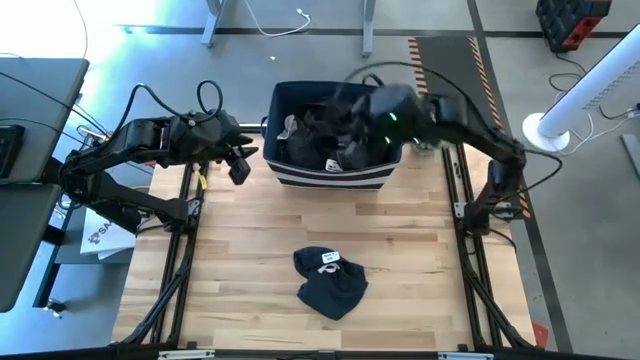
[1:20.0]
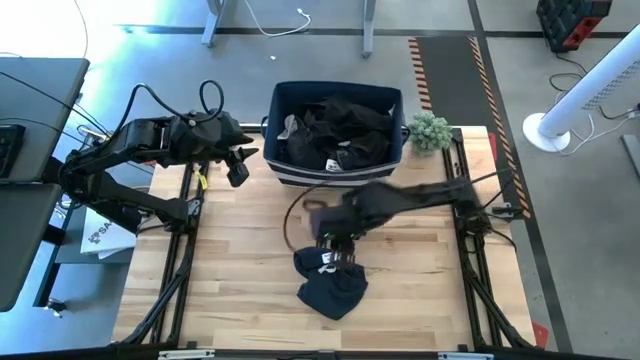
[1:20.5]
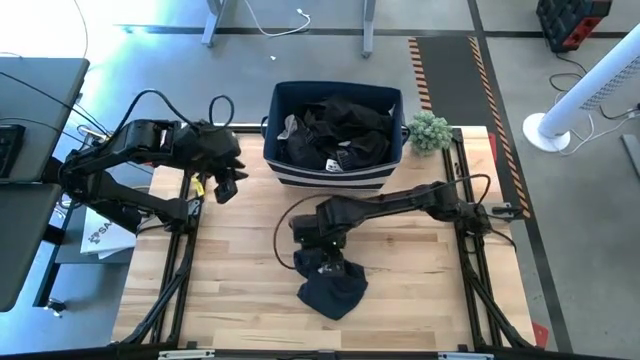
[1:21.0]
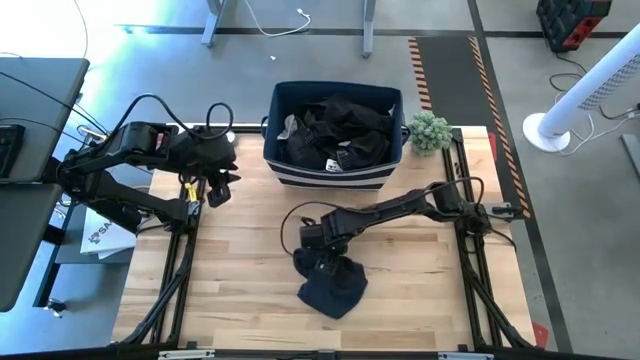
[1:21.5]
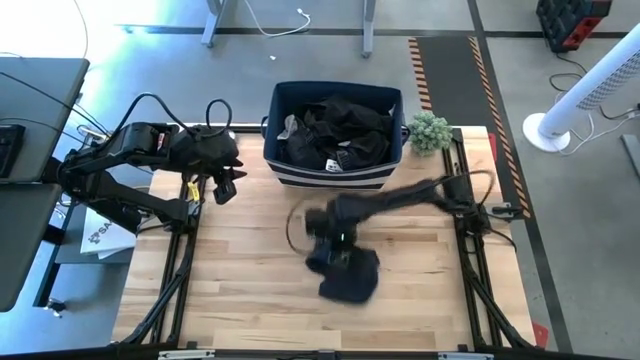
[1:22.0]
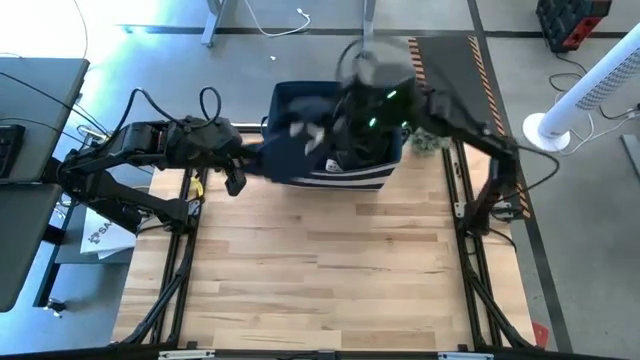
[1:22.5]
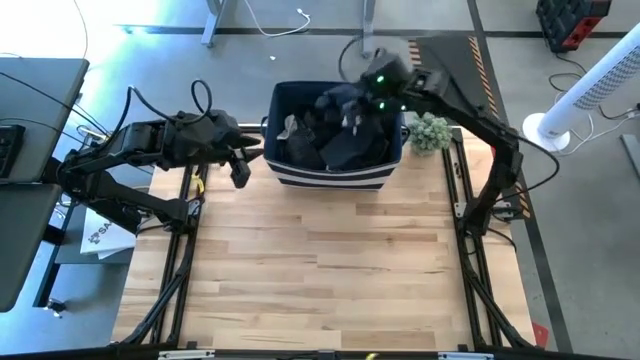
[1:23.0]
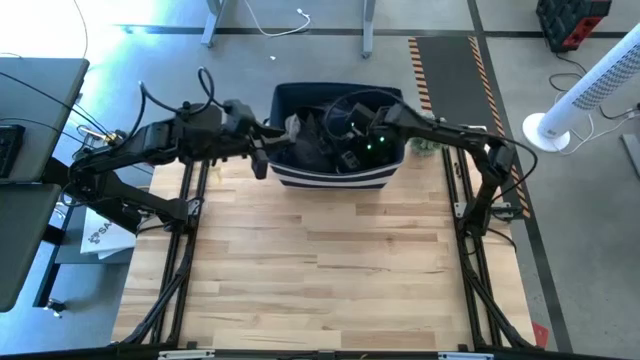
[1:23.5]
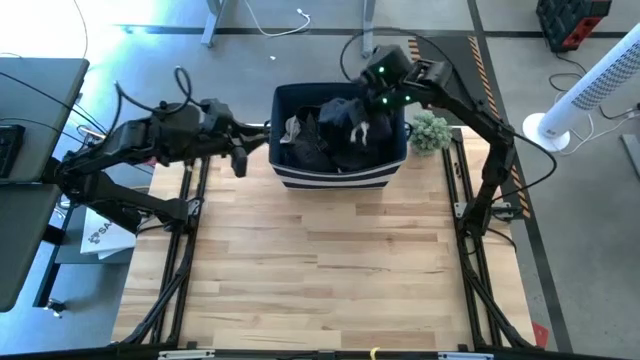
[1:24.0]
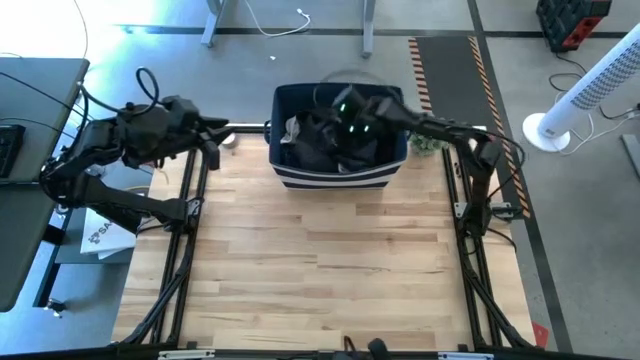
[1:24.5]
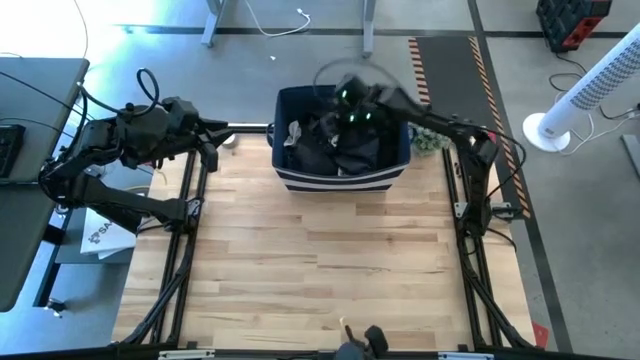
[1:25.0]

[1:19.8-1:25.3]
Task: Sort clothes
Put the blue shorts into the blue bin

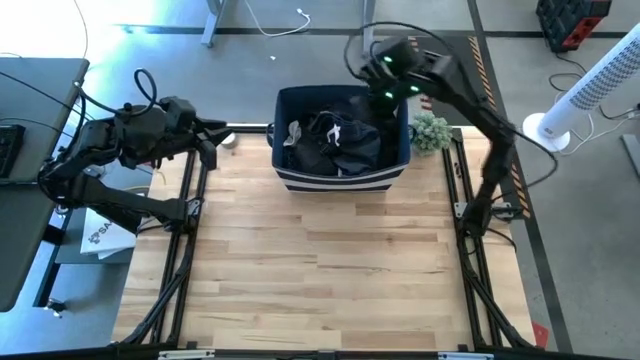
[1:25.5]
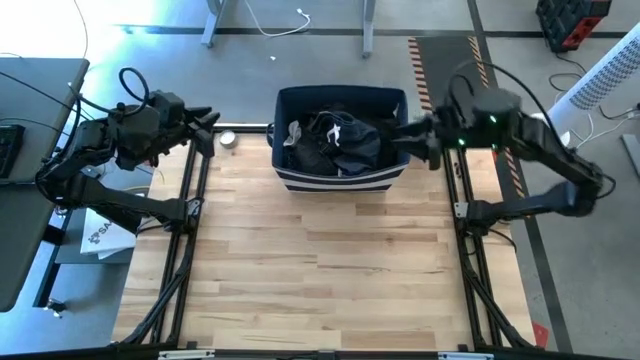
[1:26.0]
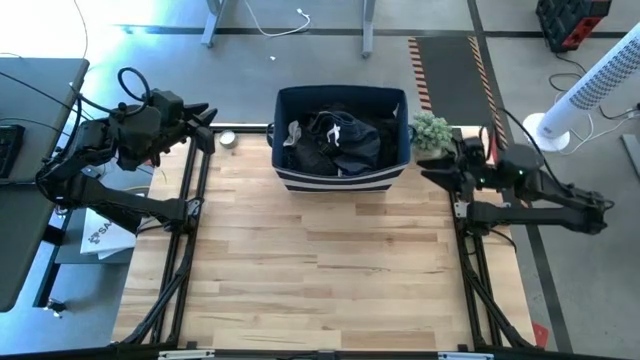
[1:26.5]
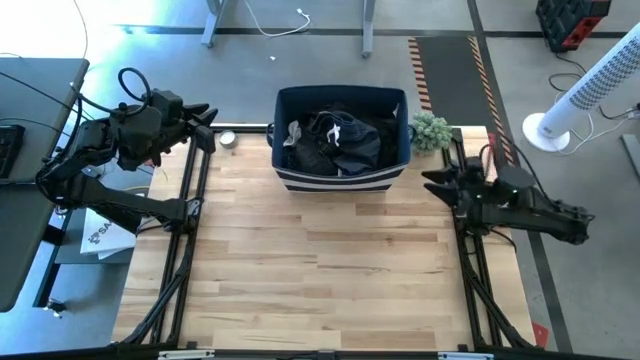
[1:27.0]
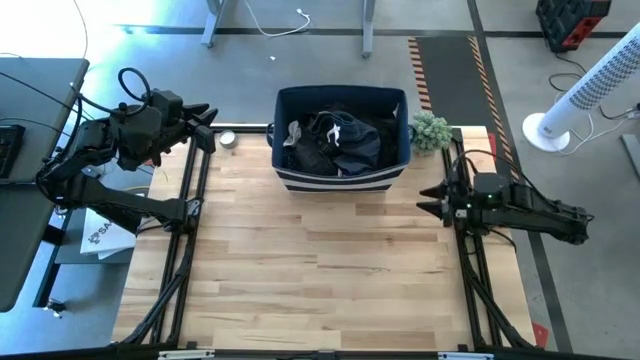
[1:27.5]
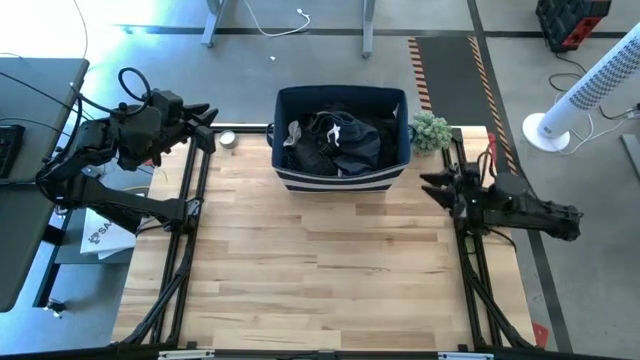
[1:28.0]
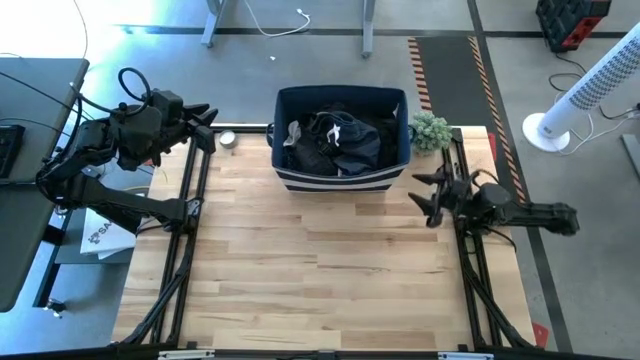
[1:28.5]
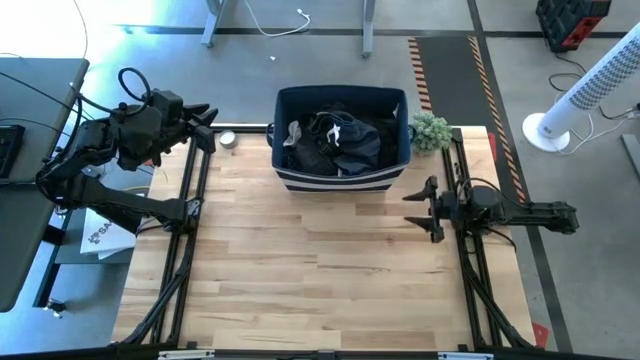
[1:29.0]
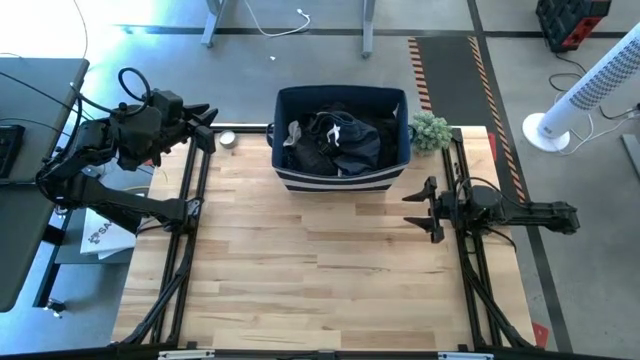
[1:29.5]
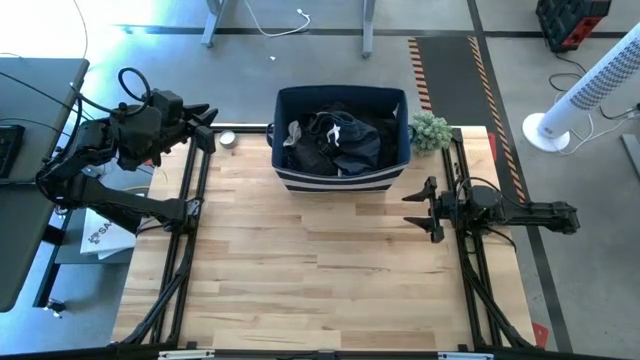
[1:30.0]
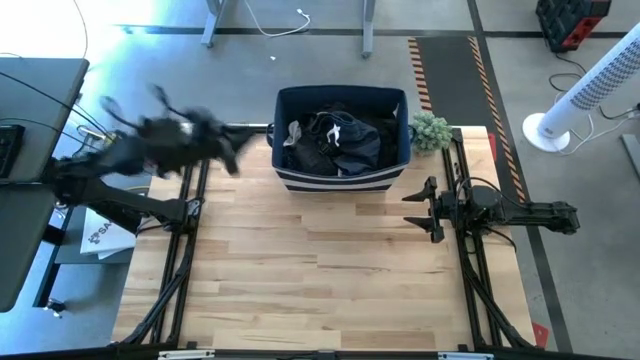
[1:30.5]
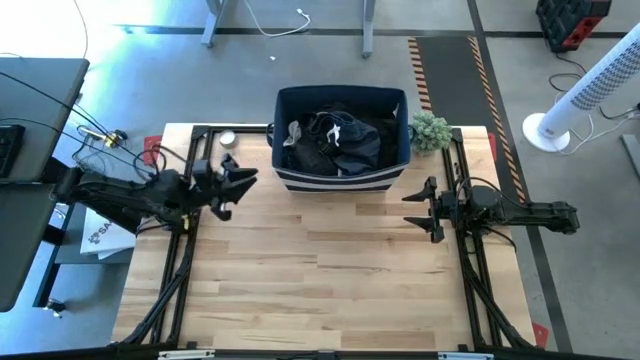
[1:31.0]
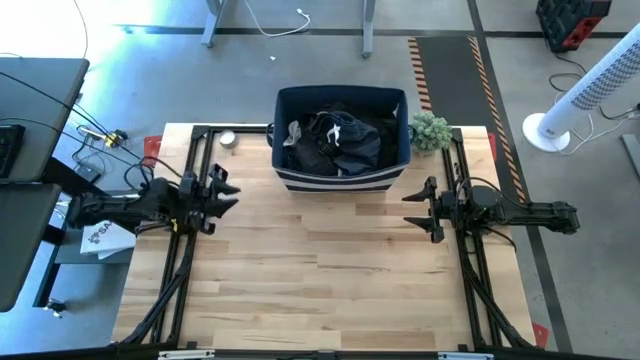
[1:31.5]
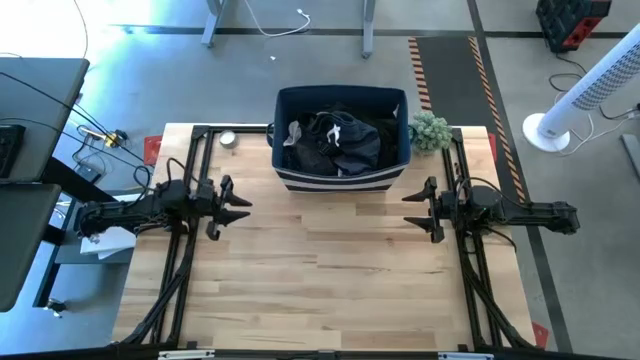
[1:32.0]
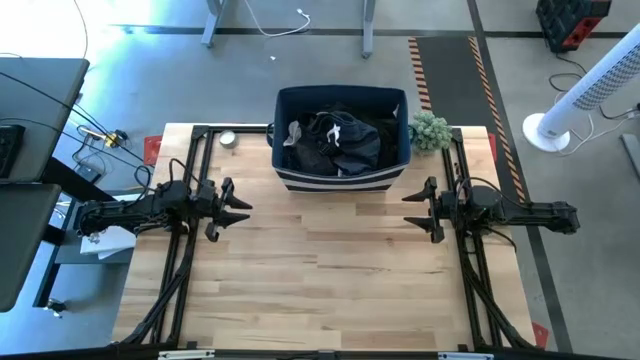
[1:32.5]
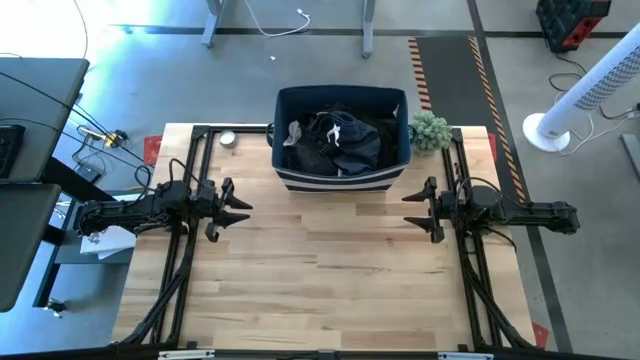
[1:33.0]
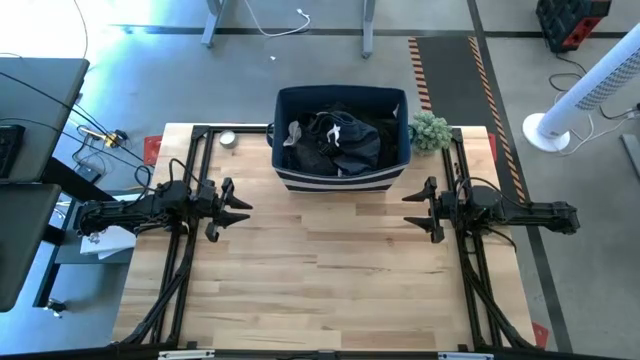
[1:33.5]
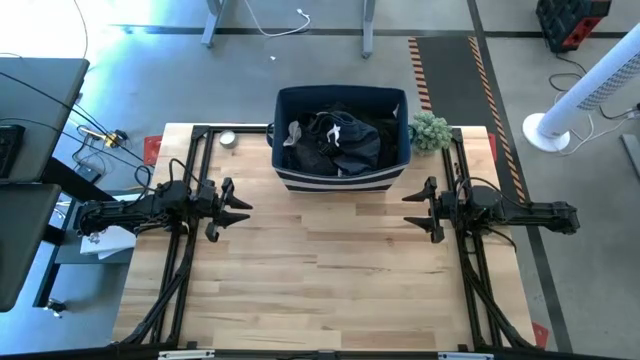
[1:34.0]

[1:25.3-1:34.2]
Return to Home Position

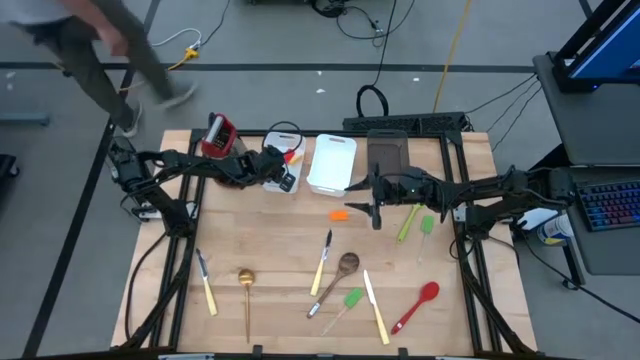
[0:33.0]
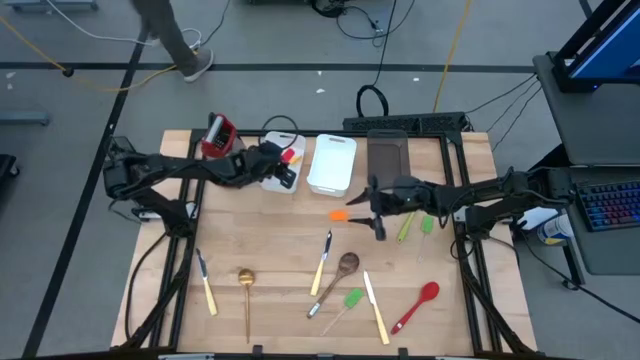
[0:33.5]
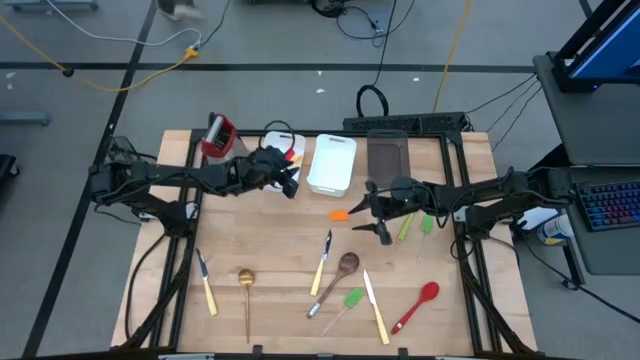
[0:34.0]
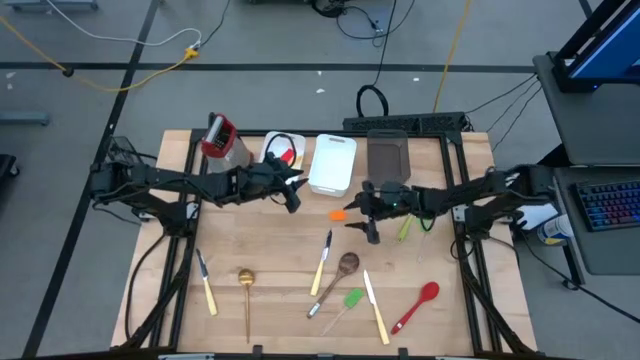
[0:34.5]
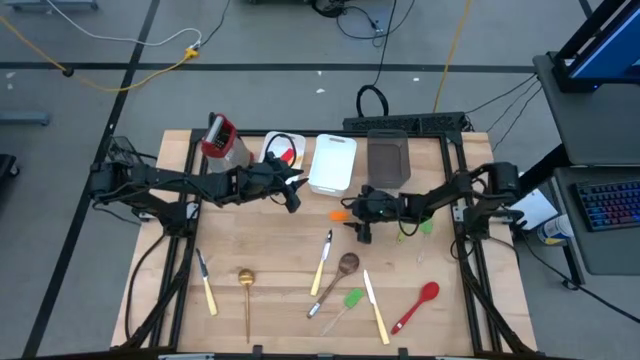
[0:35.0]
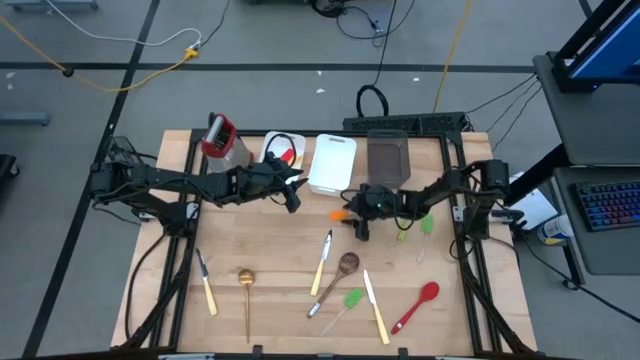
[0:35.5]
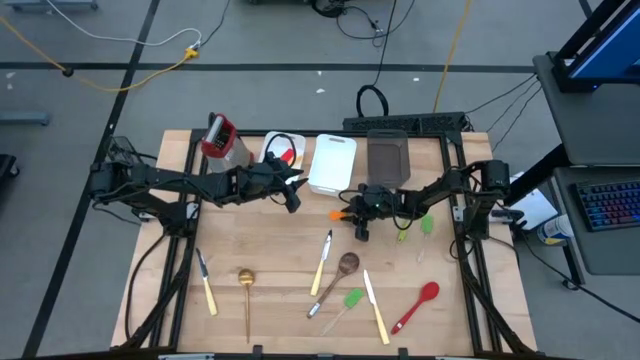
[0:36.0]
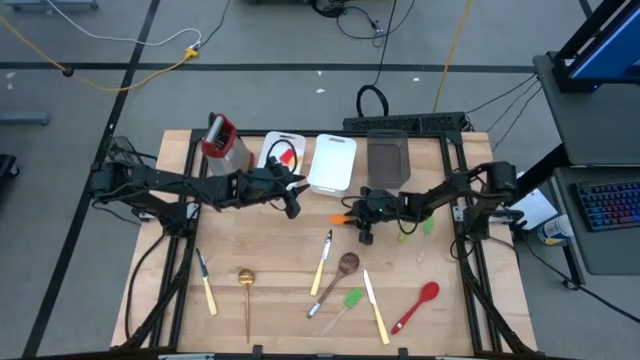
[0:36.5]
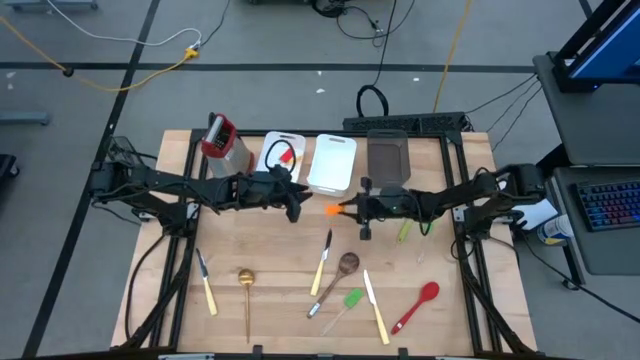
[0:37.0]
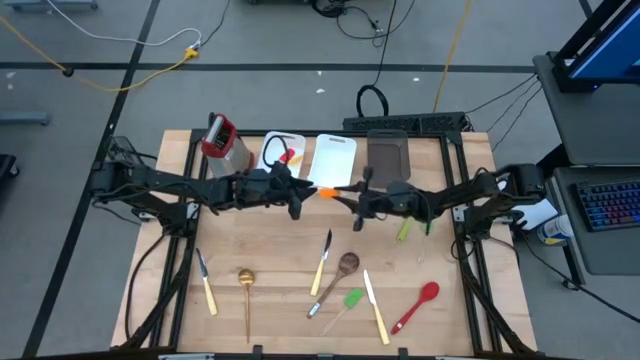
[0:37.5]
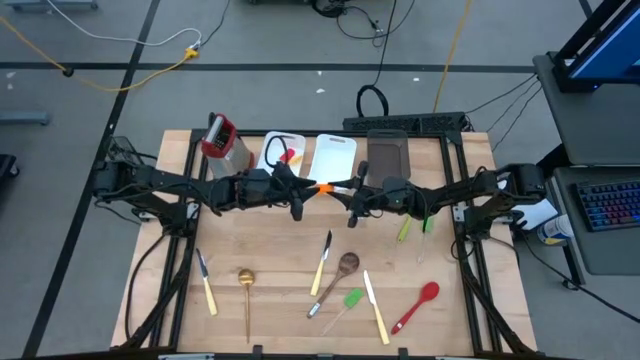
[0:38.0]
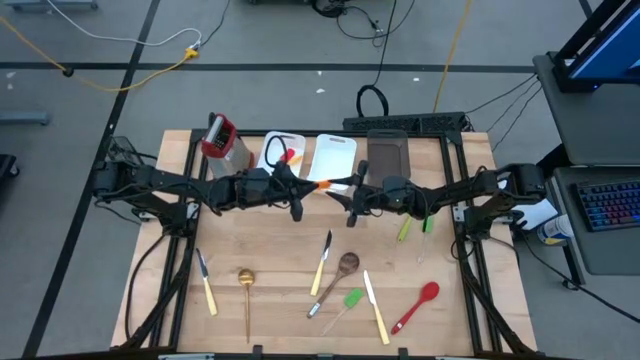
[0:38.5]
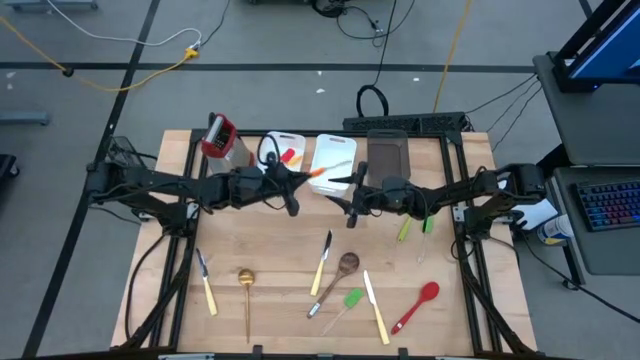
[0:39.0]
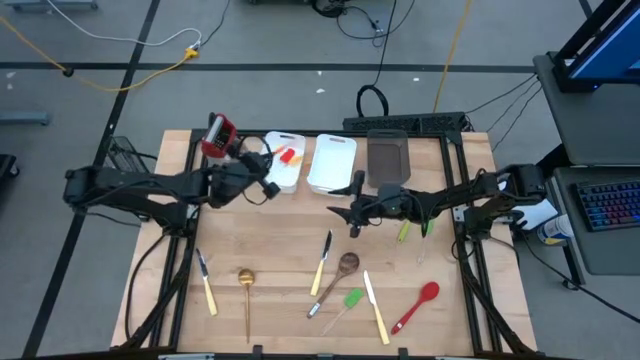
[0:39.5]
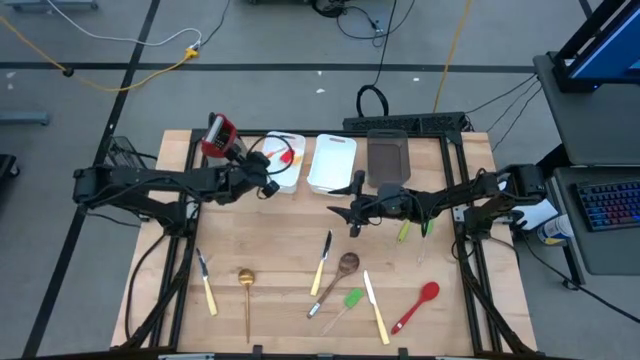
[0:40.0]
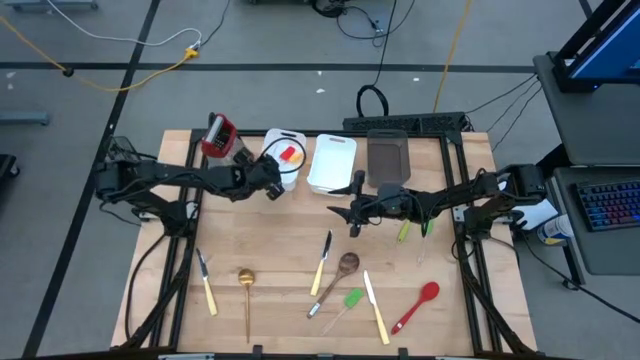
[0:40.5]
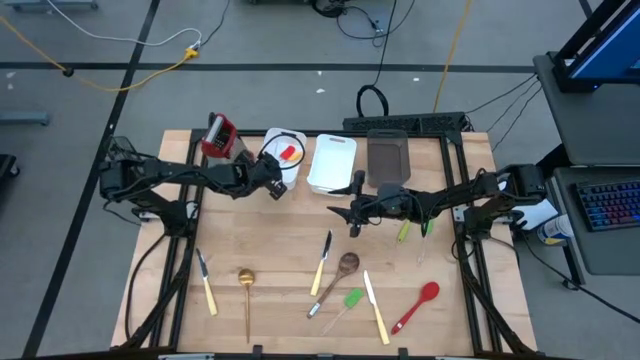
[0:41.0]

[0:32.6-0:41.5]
Task: Pick & Place Kitchen Items
Put the orange spatula into the left white bin
